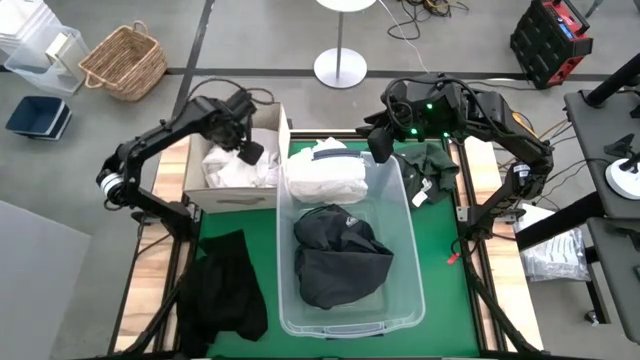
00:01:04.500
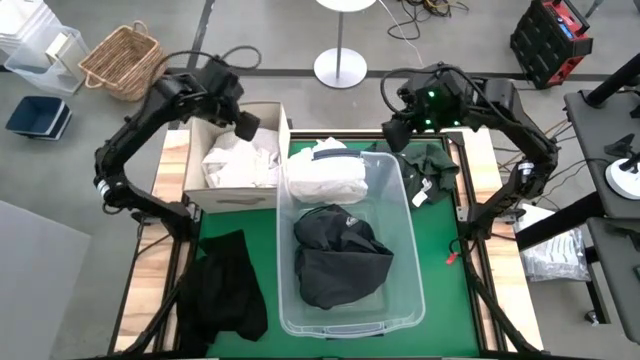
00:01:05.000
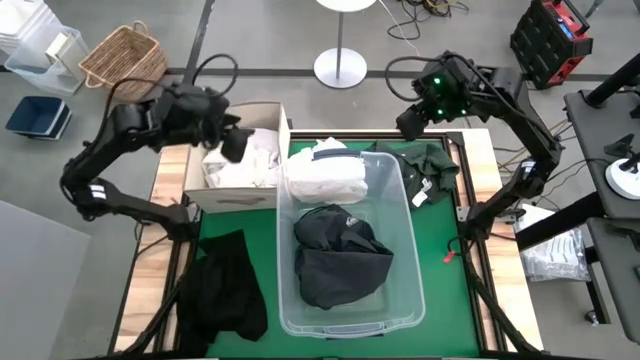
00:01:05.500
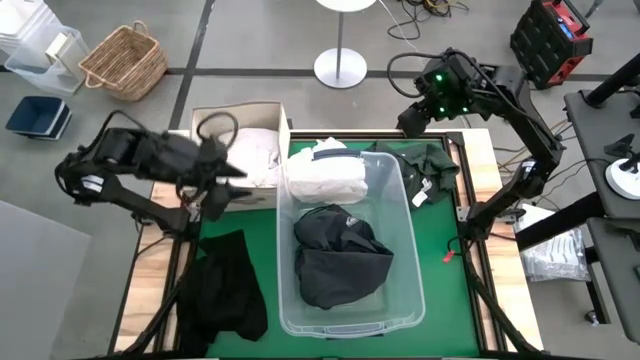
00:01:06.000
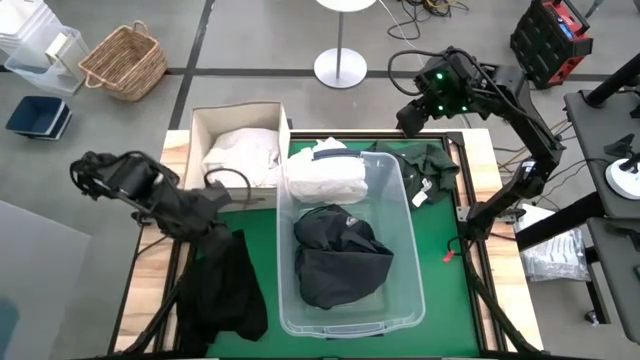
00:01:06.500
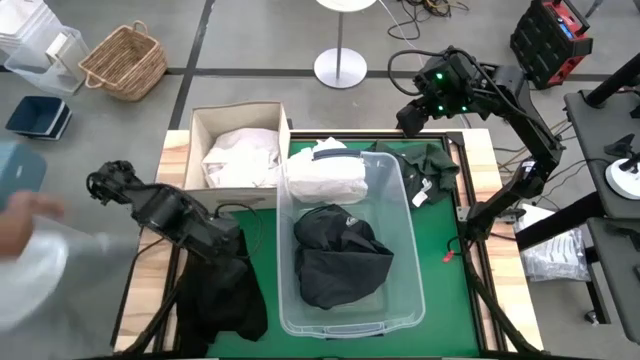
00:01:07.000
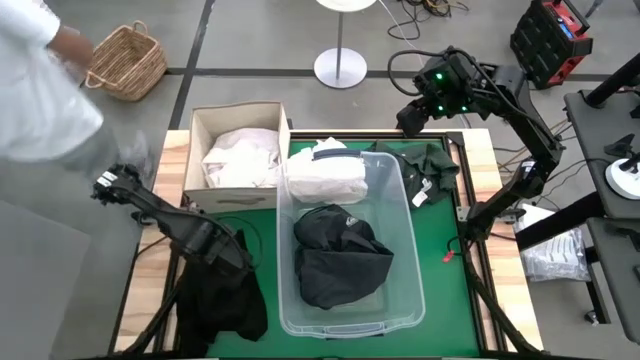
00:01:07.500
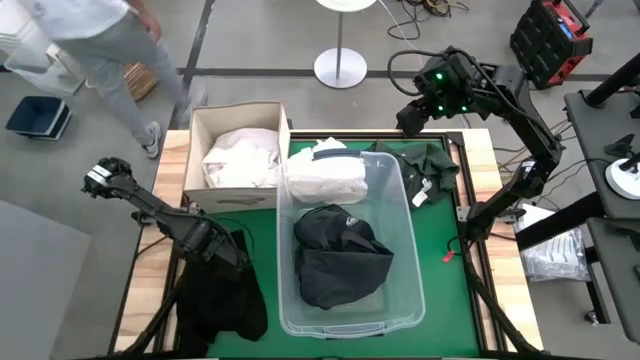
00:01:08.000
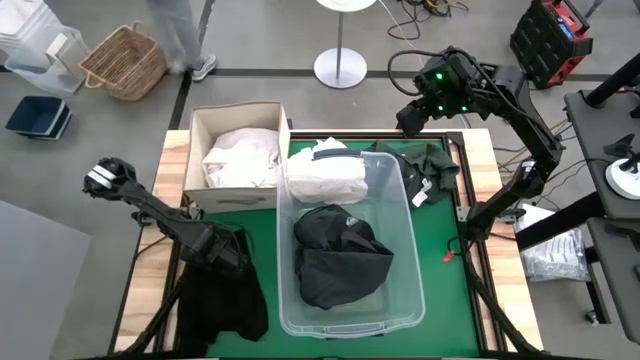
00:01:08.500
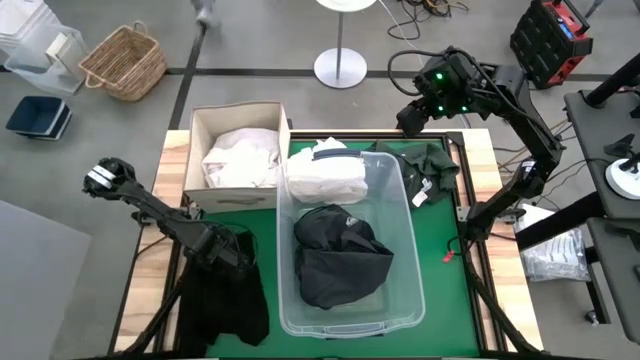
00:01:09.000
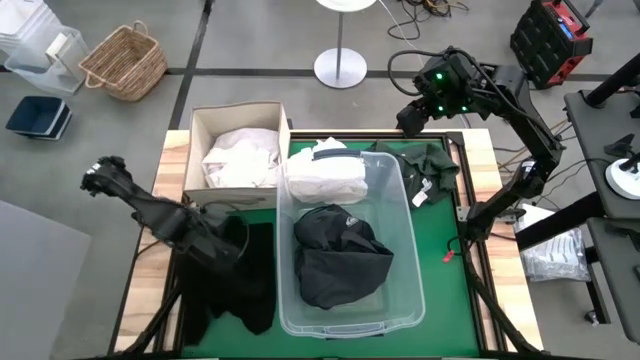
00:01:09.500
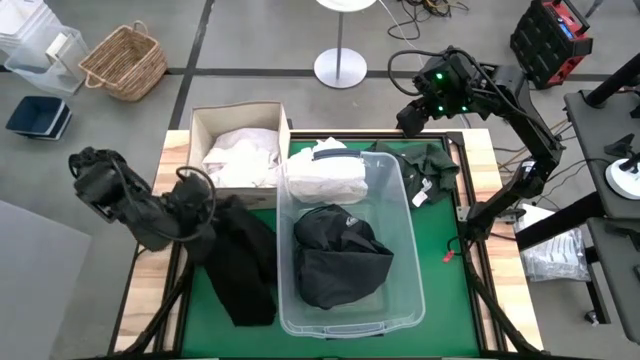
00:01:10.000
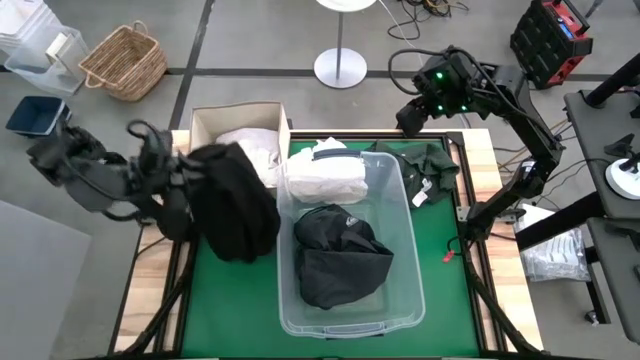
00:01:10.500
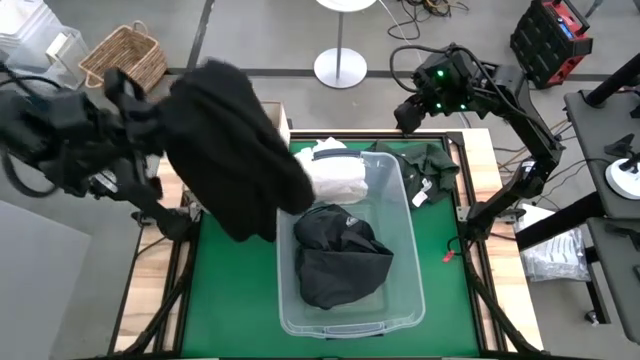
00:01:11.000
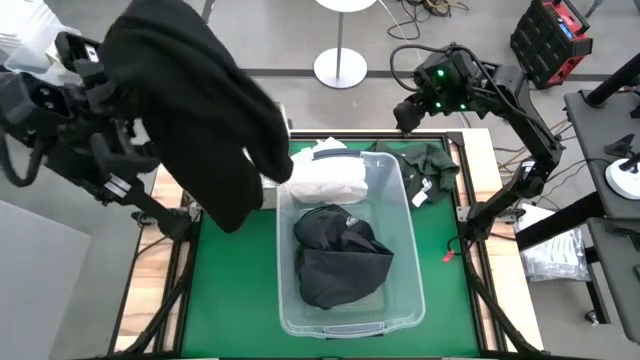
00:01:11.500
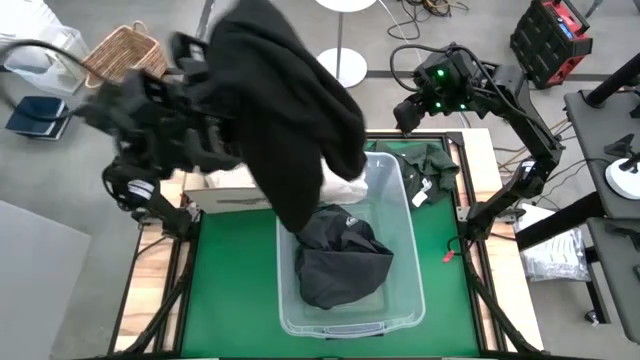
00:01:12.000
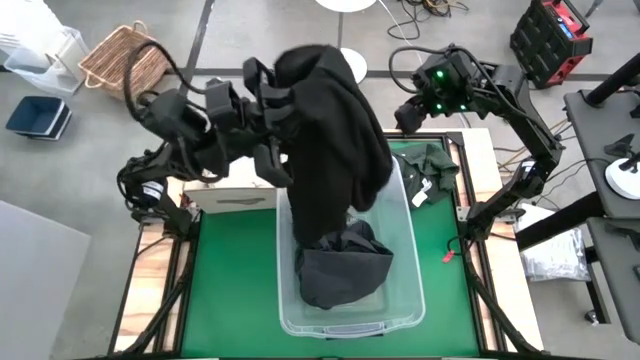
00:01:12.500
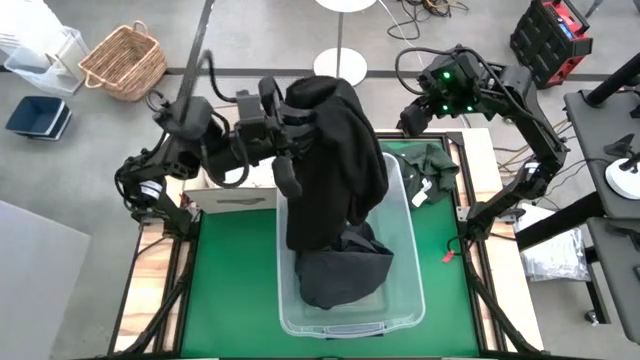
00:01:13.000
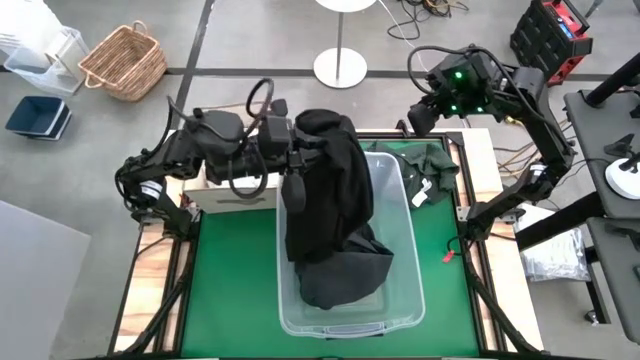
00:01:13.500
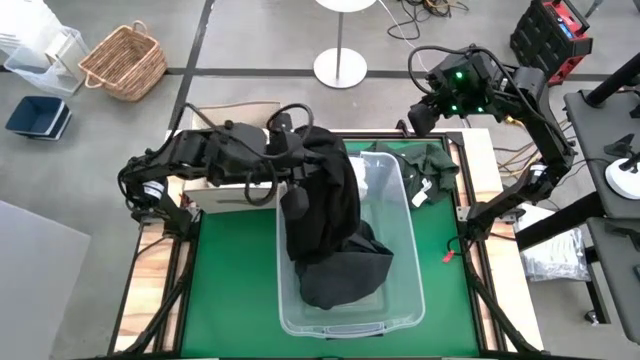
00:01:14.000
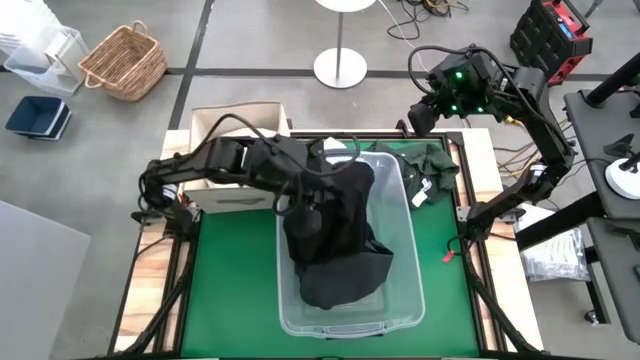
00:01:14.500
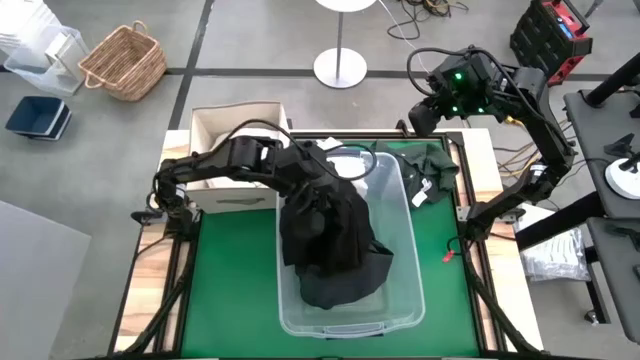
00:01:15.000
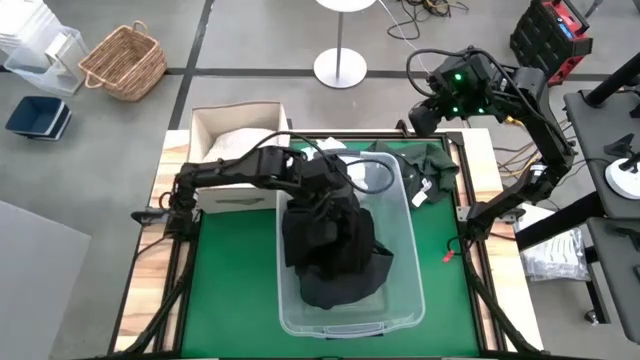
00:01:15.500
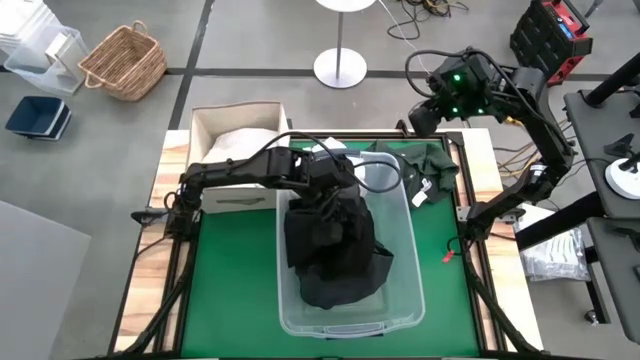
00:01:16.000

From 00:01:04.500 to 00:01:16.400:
Task: Sort clothes
Put the black pants into the transparent bin

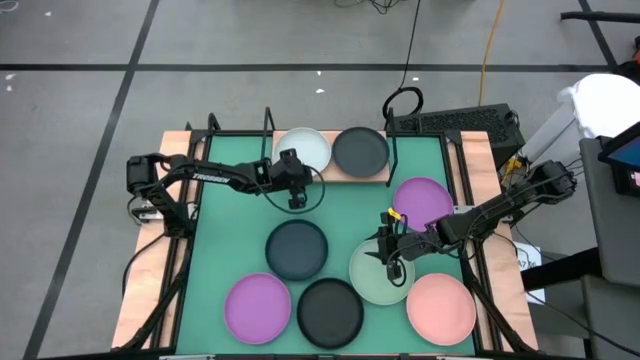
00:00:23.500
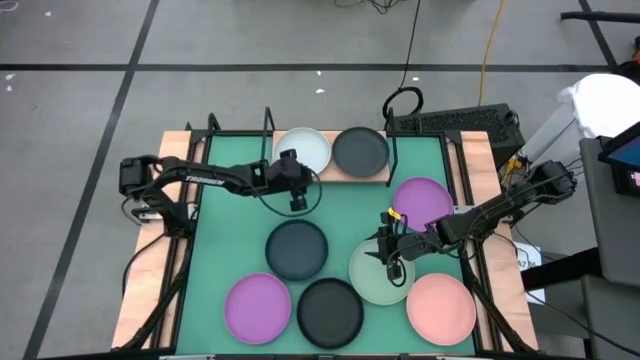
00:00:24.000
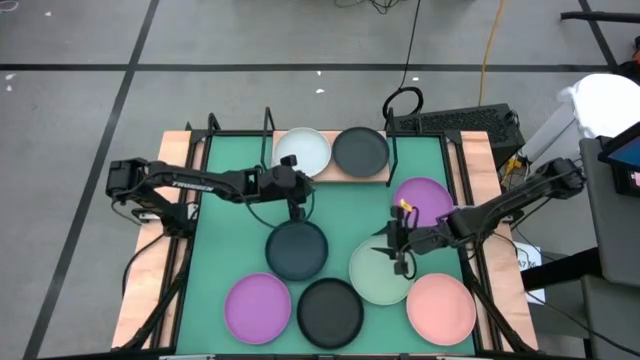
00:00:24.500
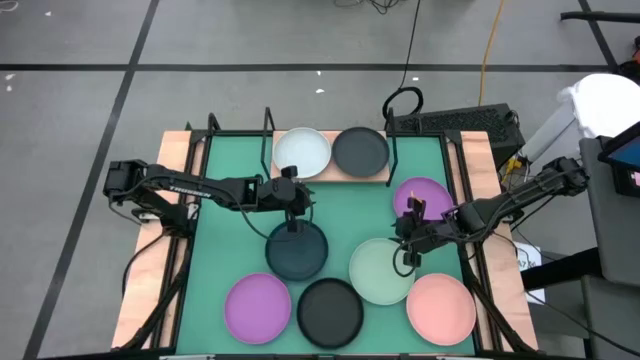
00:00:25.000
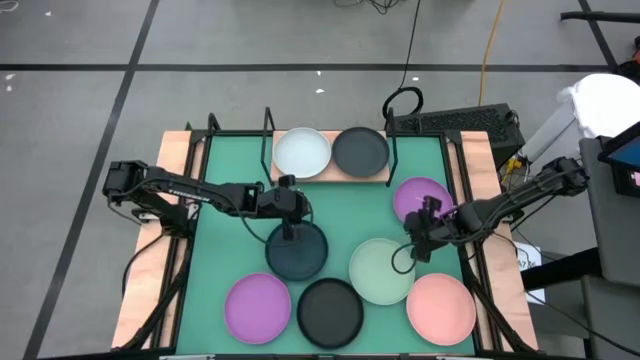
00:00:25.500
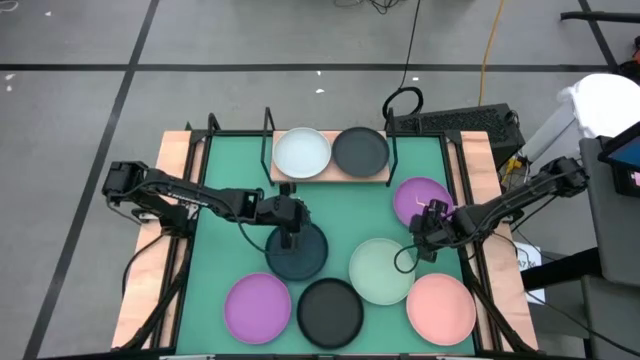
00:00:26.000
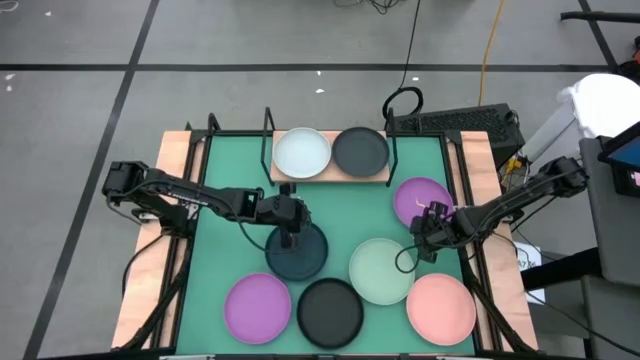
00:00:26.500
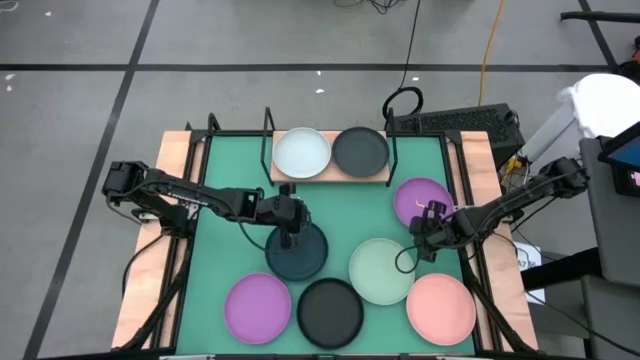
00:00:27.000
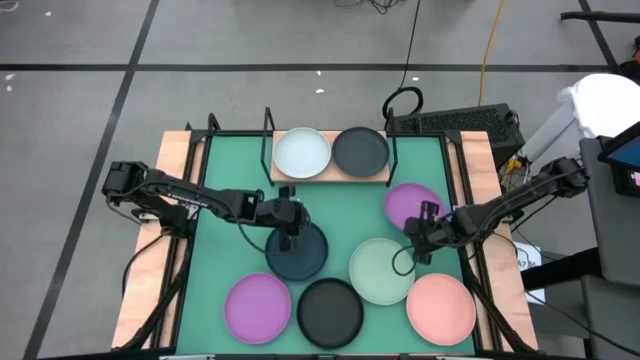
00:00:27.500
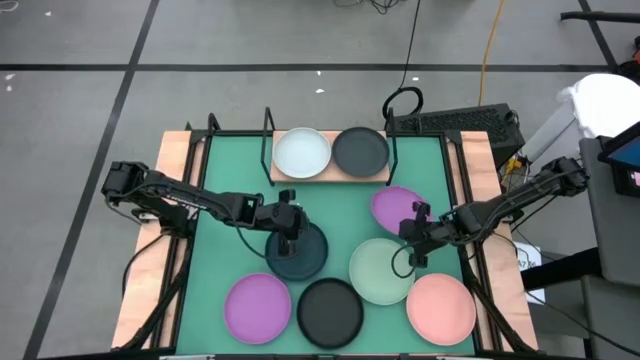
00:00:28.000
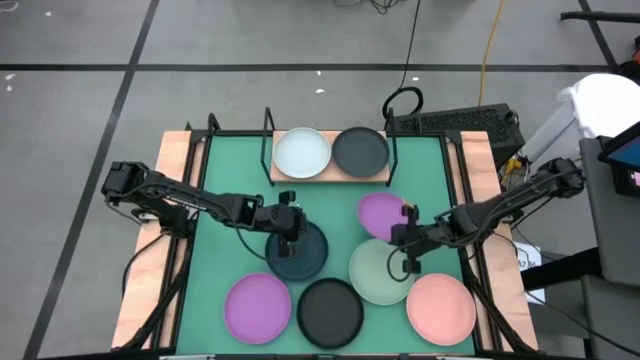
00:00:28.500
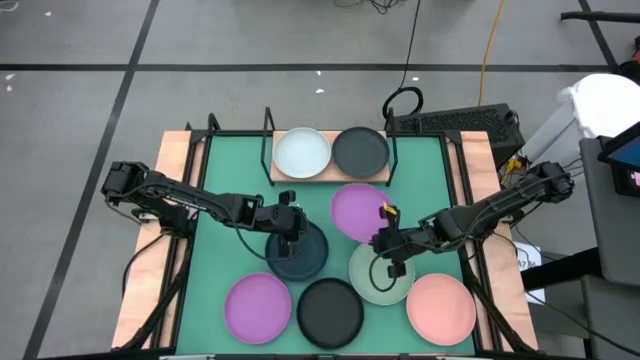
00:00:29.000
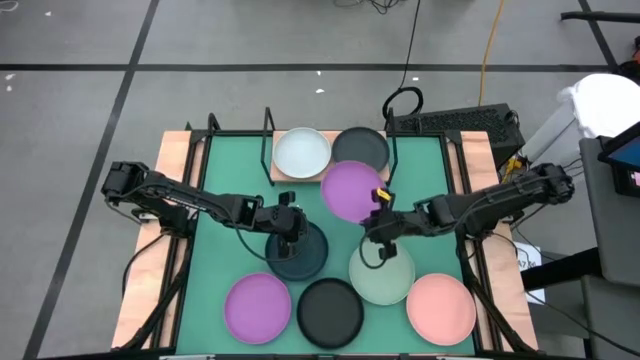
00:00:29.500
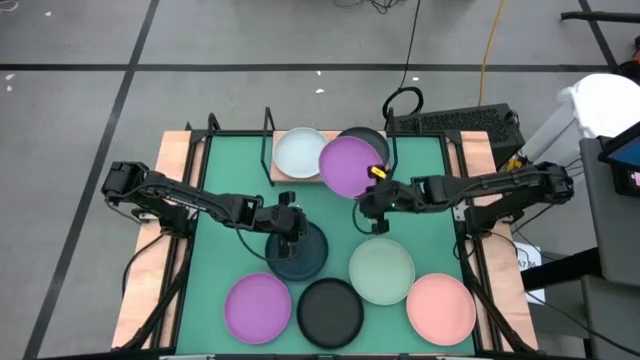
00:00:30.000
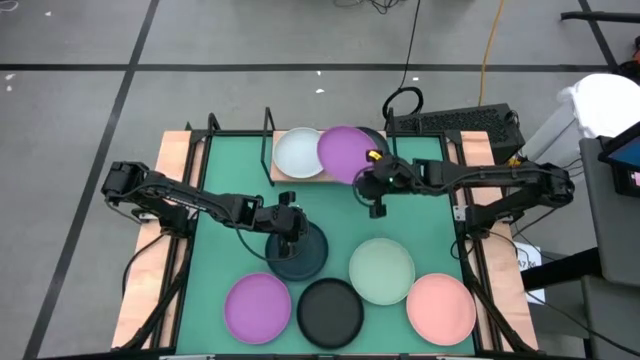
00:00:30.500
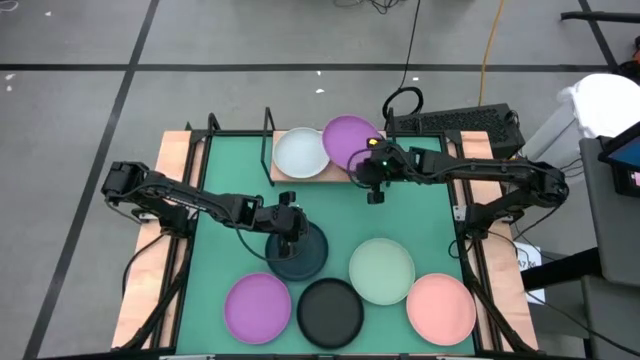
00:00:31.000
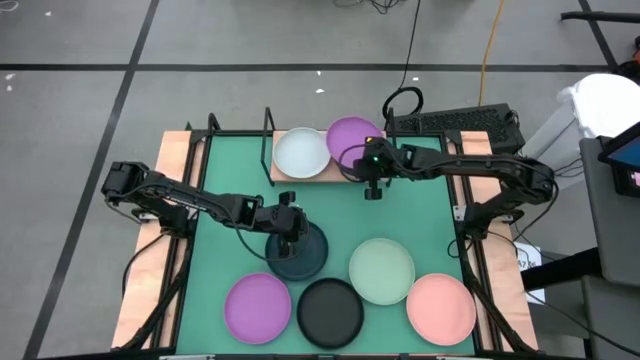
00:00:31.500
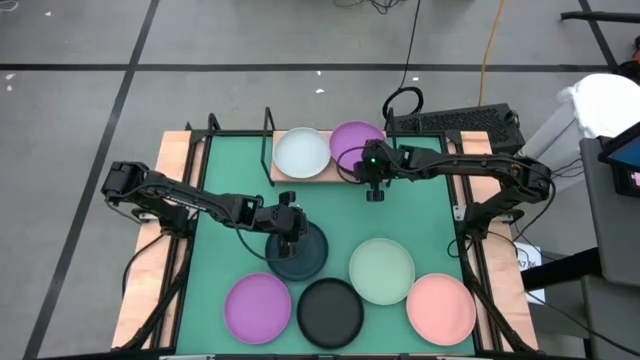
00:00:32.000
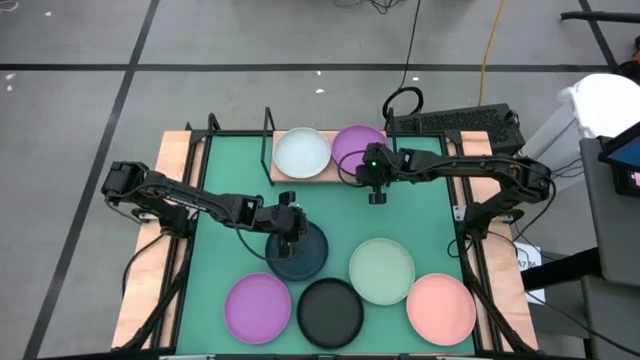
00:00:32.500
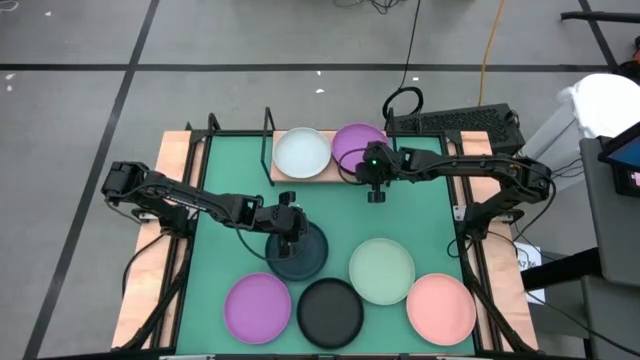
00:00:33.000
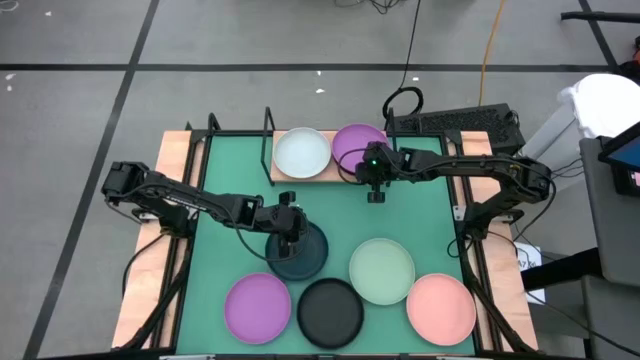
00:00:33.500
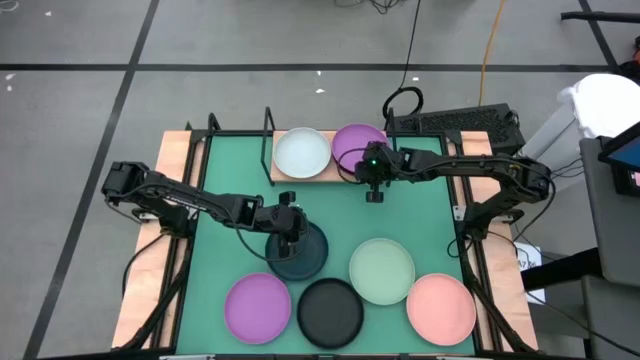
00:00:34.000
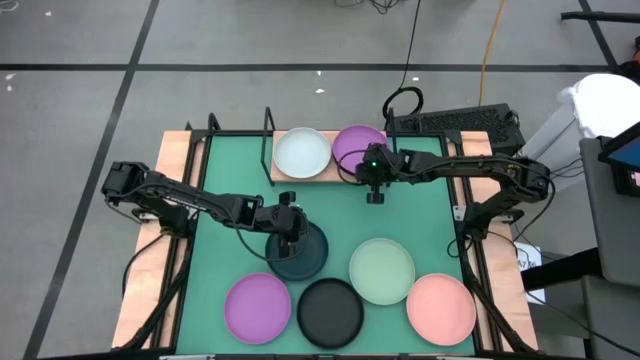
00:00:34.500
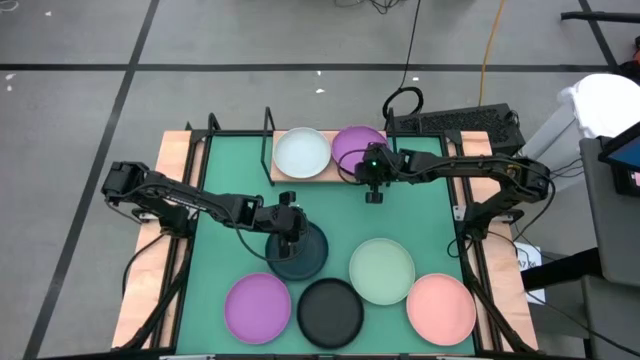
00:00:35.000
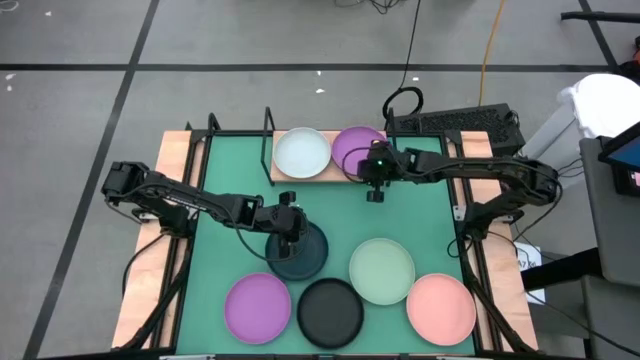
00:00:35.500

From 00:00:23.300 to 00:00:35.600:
Task: Place and stack plates onto a shelf
Stack the right purple plate on top of the black plate on the shelf
